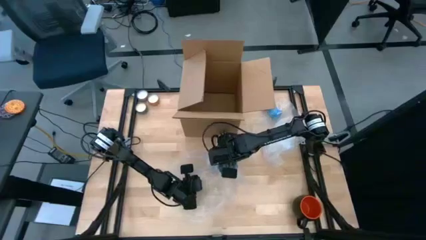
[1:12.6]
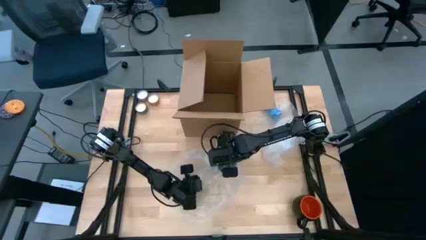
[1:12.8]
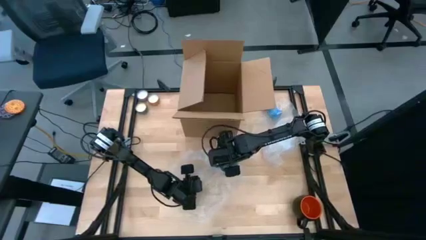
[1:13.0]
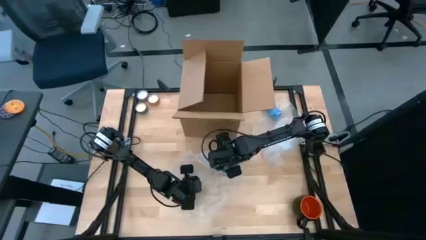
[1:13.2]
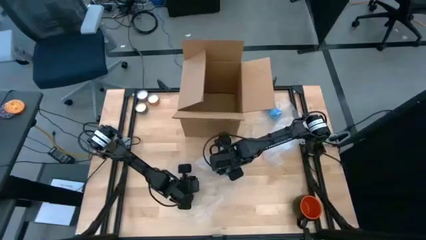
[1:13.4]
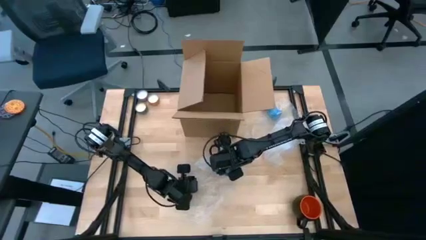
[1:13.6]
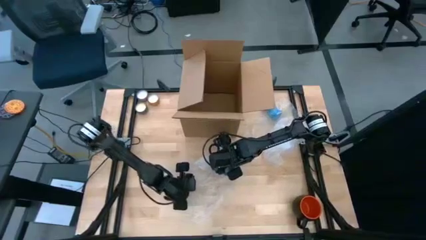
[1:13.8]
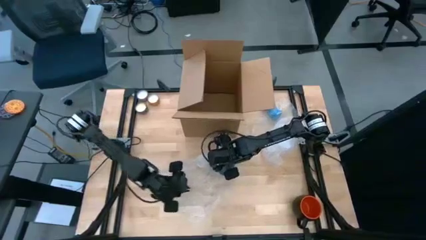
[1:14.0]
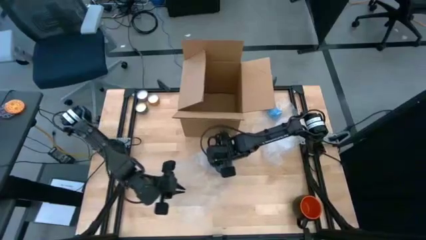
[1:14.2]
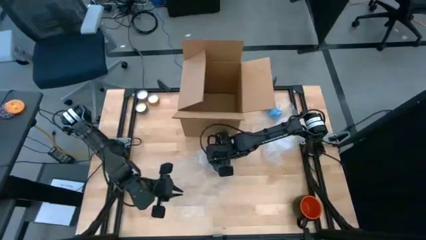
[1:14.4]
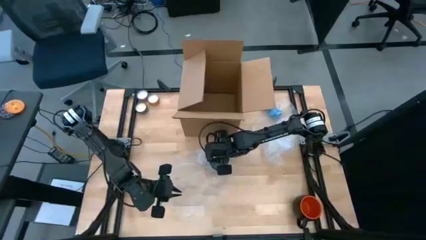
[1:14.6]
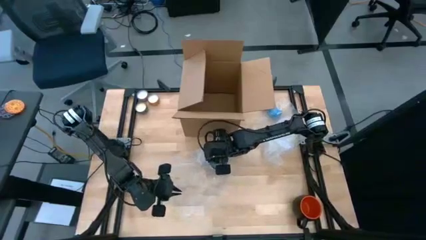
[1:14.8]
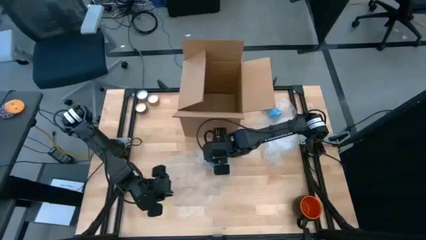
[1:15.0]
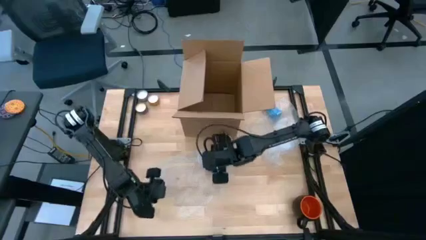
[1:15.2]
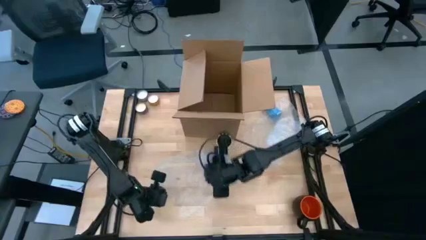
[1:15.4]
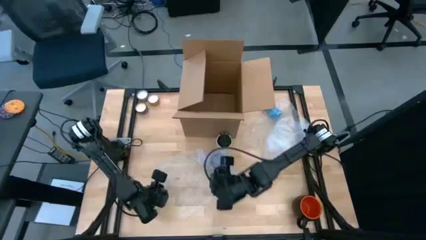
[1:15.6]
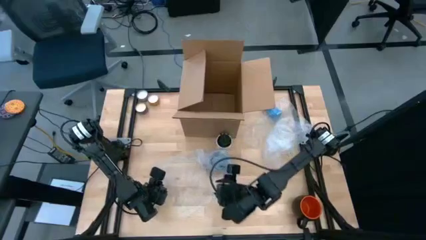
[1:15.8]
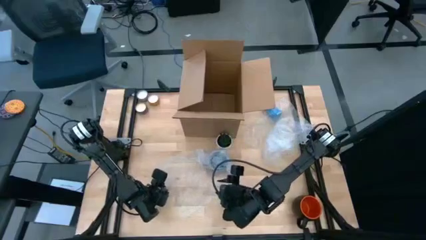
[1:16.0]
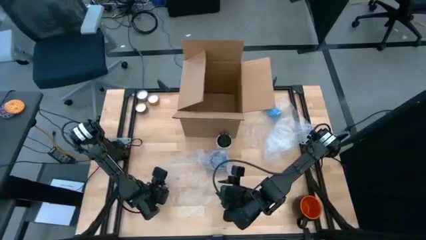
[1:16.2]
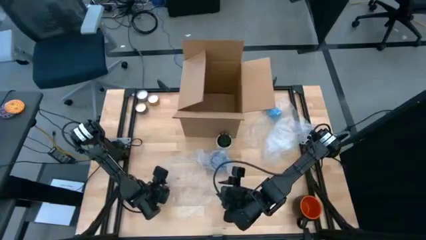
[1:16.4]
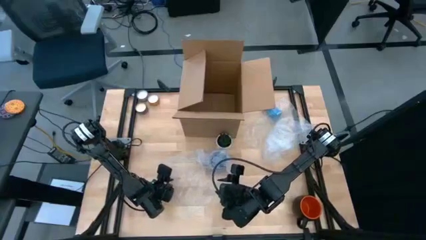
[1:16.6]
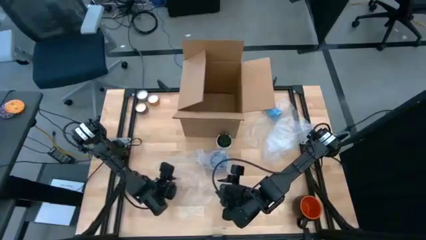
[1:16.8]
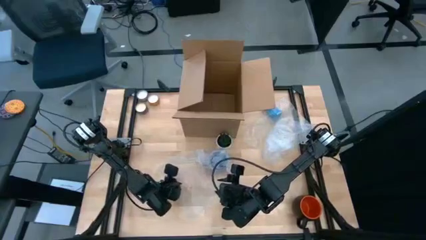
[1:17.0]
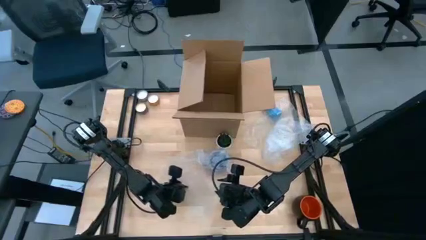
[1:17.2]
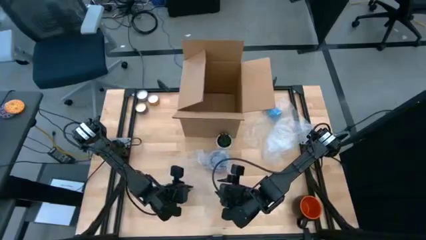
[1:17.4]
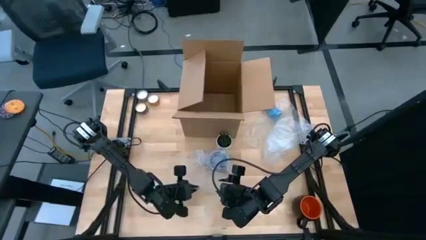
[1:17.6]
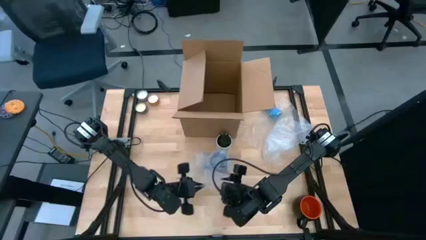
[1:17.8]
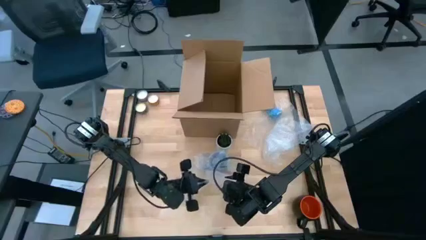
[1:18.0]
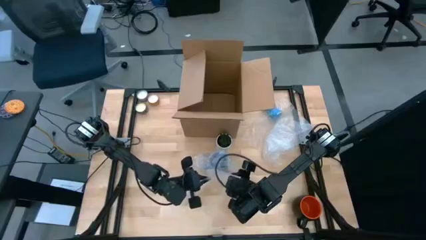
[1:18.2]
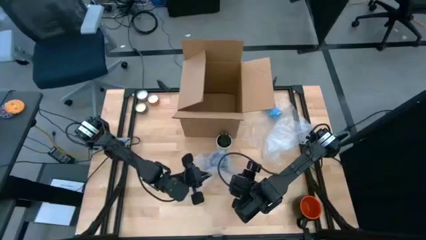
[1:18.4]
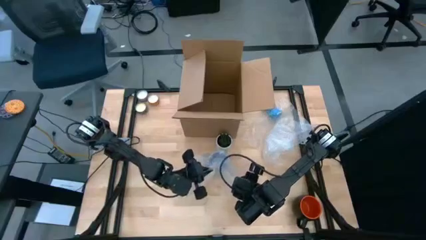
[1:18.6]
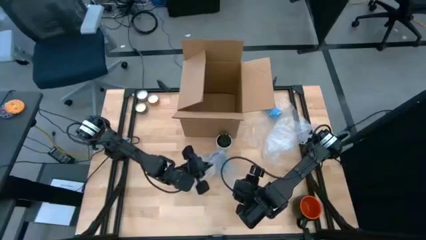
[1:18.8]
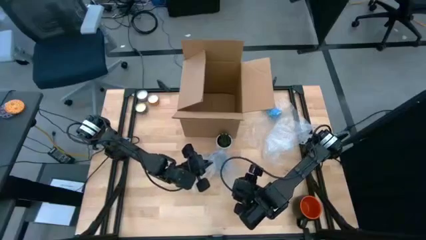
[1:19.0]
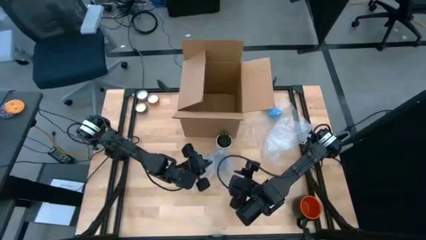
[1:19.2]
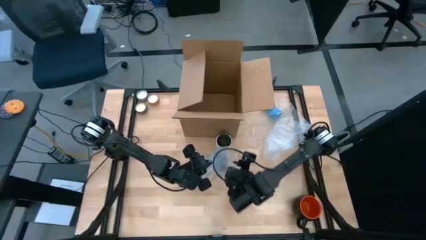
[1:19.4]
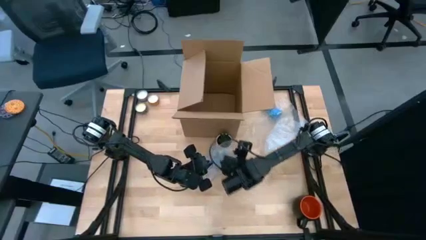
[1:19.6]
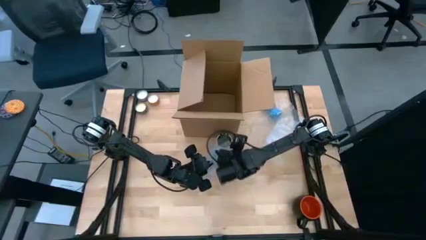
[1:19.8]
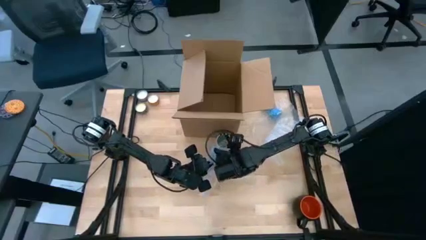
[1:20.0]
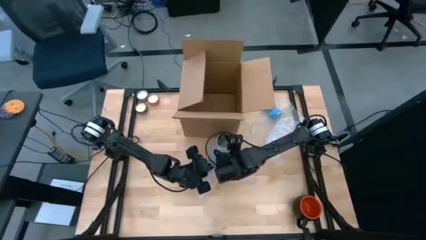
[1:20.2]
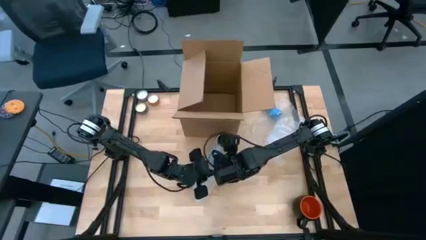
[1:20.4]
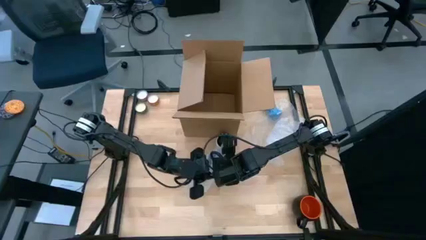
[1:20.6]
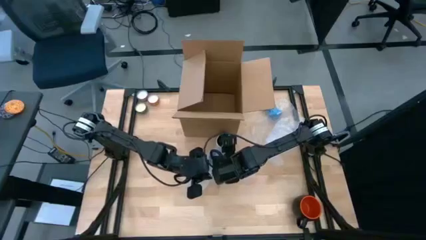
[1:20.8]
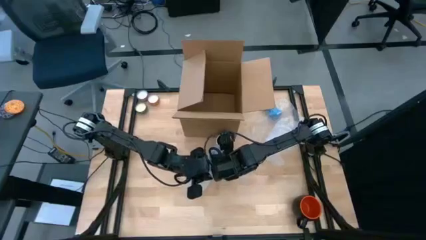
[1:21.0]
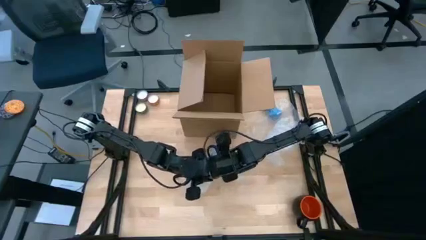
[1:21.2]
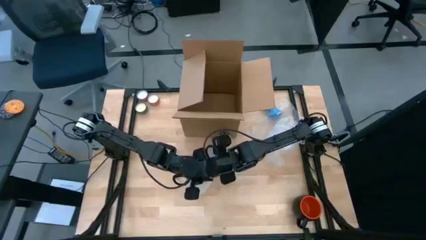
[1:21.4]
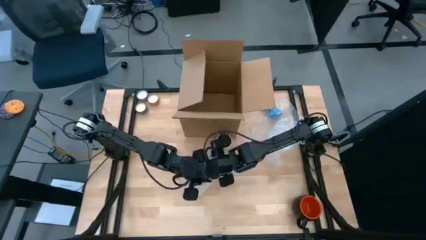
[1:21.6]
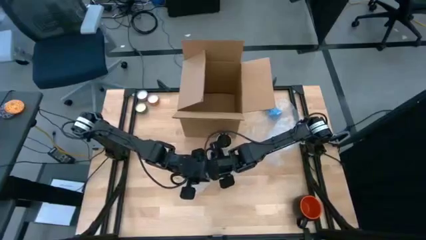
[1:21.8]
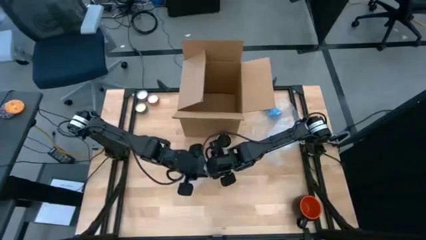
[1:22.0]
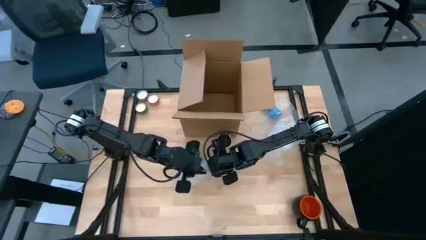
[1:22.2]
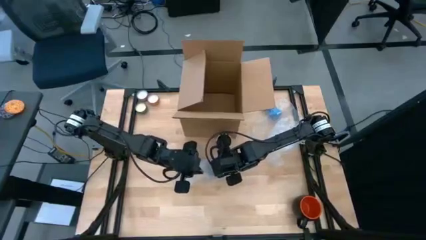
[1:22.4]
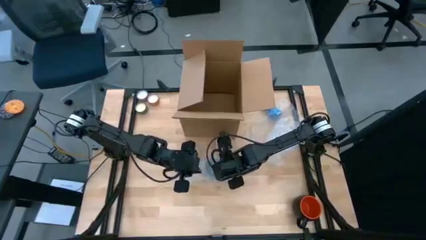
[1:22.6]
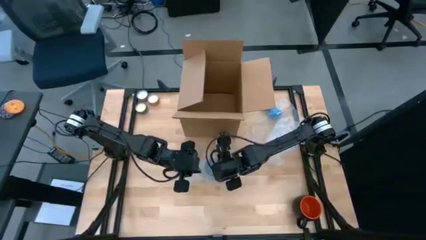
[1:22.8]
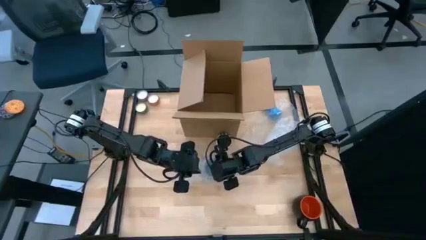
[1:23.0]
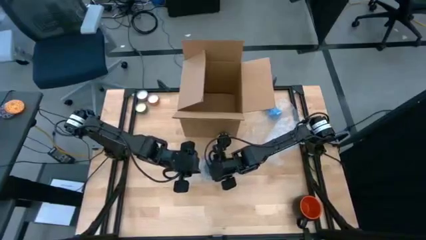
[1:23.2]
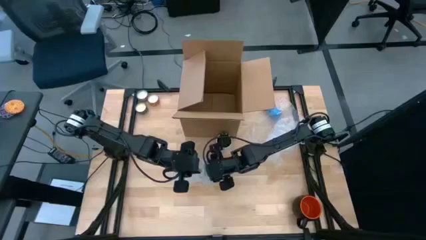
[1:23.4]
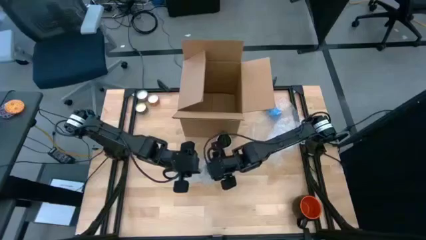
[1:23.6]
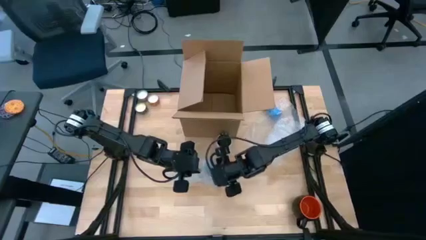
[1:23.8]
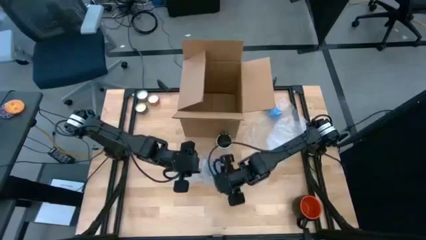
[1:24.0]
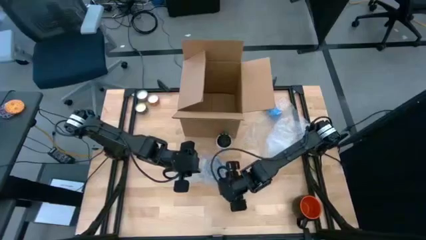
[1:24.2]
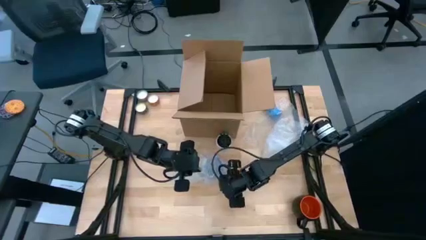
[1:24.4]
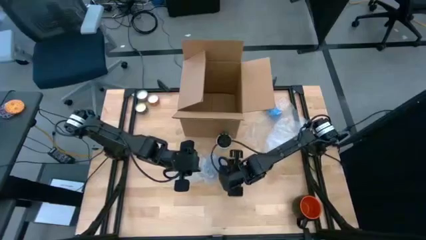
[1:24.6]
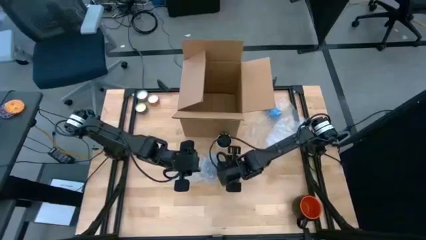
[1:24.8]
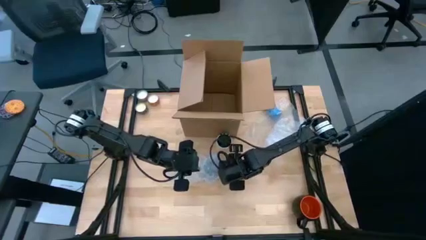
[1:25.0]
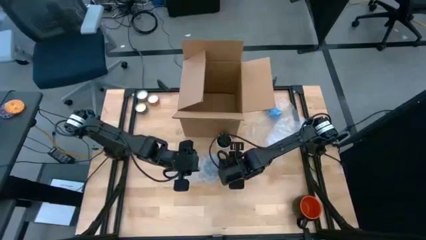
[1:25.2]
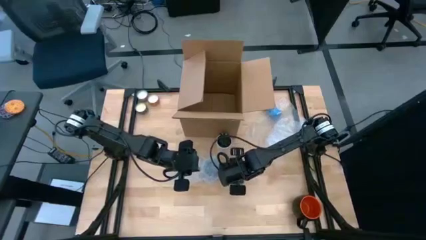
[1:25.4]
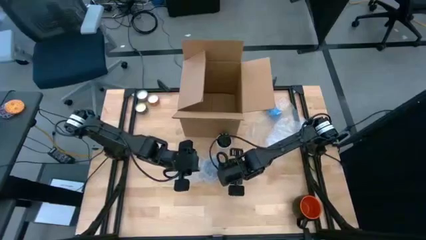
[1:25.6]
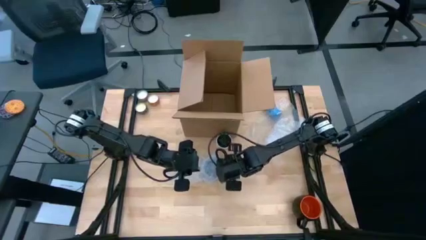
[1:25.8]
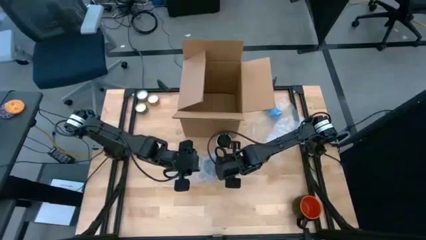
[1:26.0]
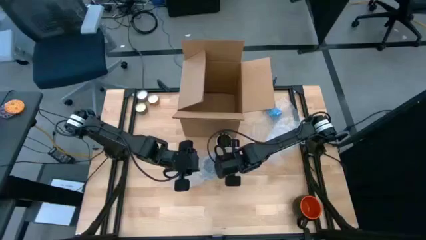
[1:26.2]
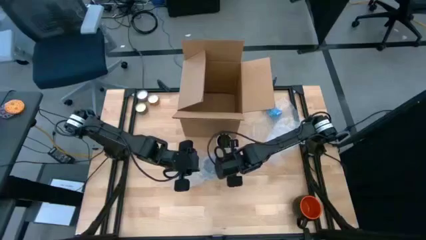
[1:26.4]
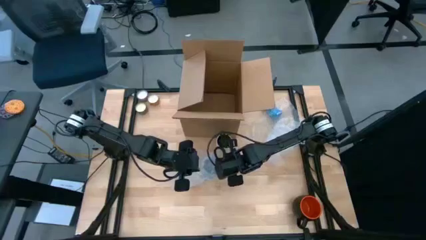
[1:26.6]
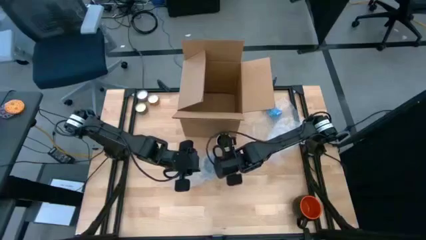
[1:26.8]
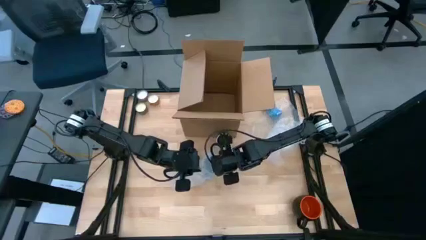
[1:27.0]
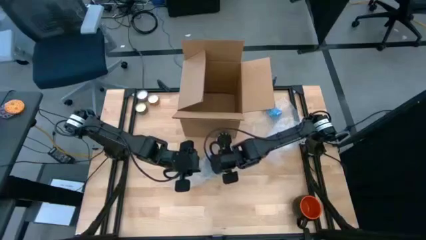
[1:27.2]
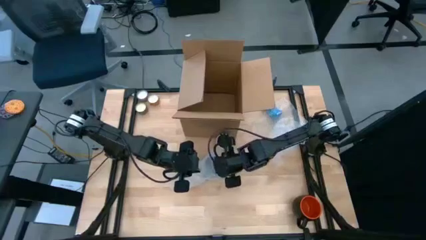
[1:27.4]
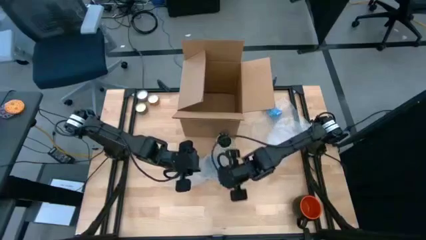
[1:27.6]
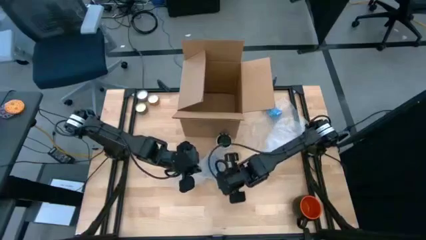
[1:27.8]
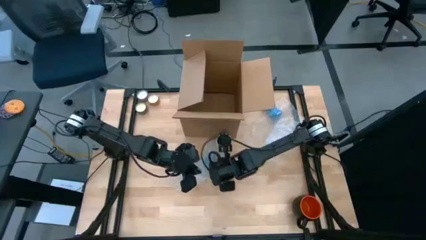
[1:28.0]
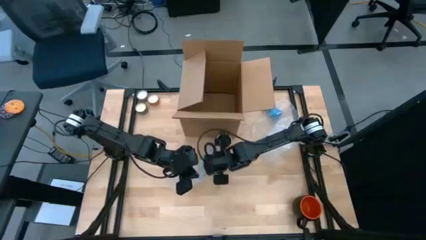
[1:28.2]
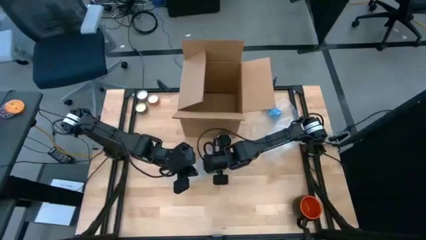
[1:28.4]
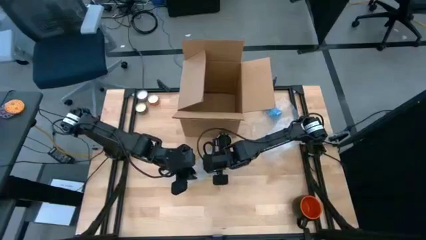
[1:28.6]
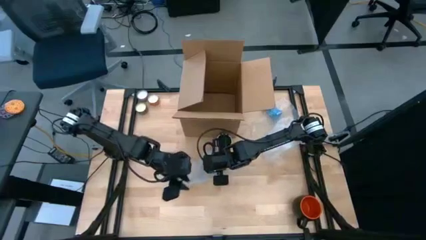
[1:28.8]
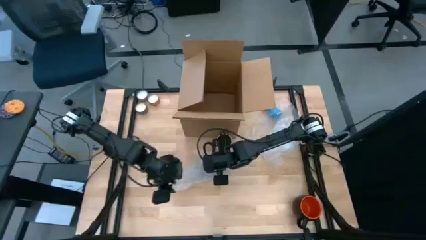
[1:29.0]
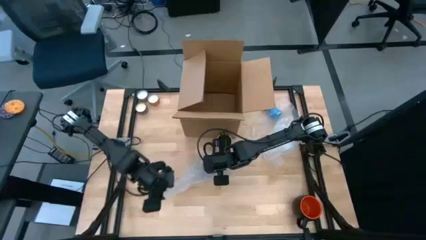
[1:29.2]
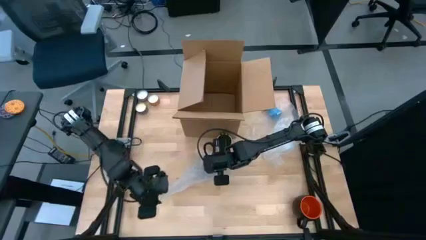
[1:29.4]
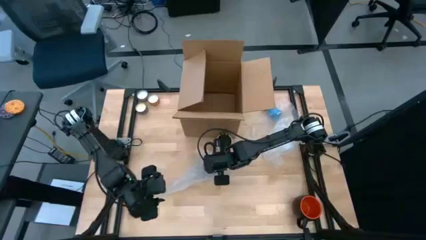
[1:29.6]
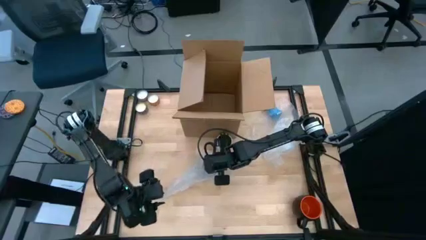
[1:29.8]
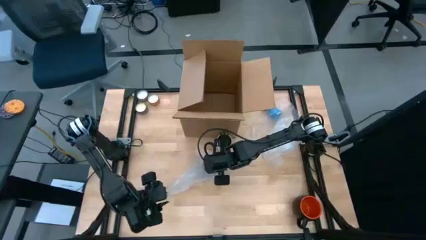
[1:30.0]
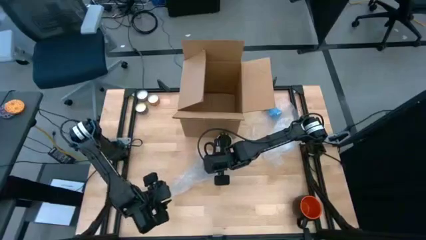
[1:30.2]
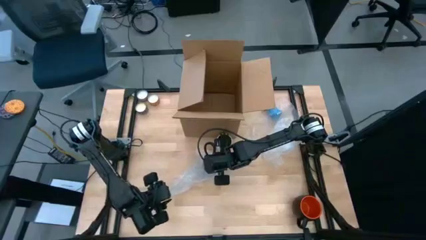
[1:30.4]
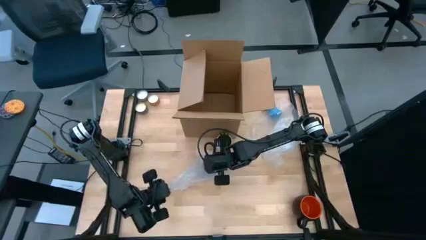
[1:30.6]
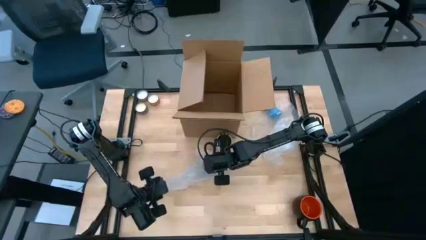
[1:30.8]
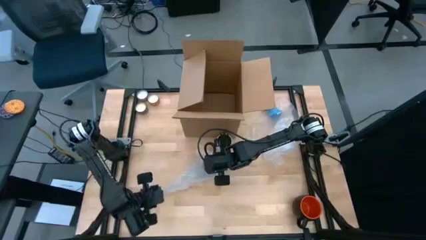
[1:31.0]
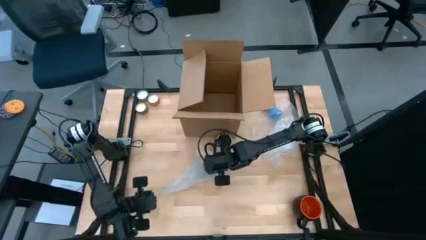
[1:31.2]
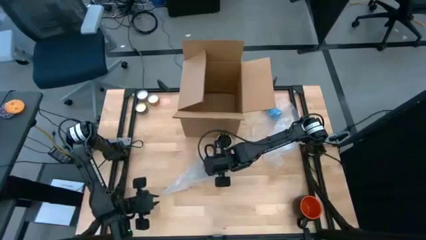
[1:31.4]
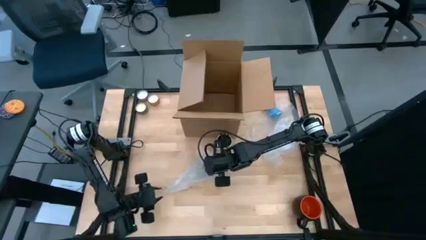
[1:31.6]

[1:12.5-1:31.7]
Task: wrap mug
Wrap the blue cup with the transparent bubble wrap
